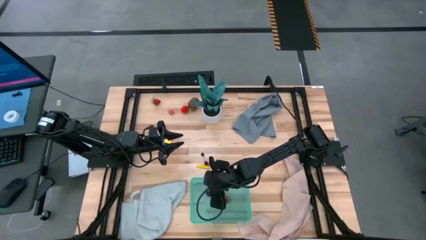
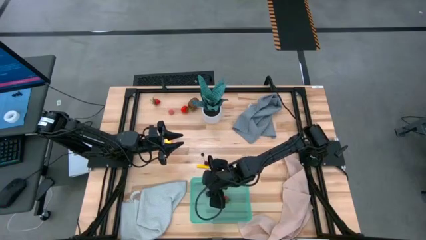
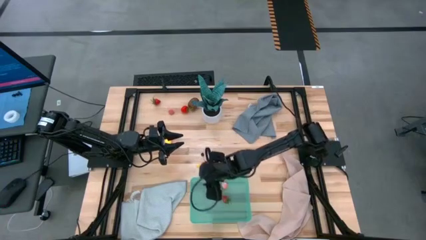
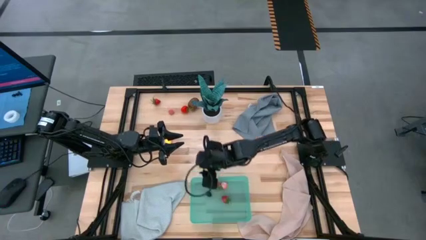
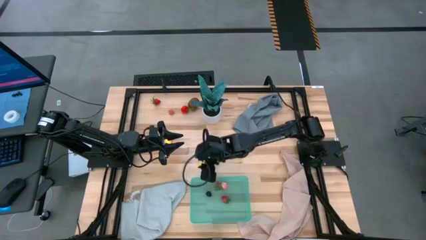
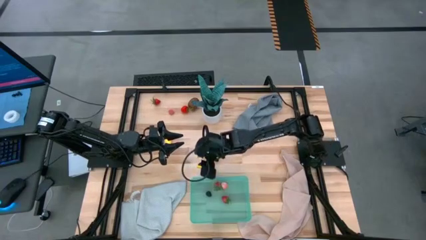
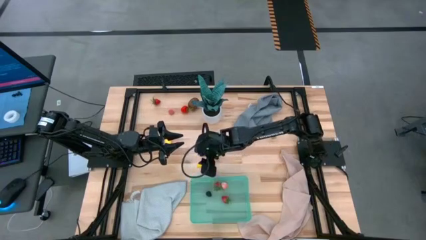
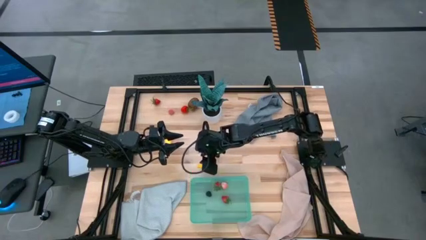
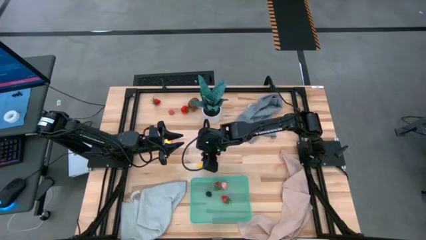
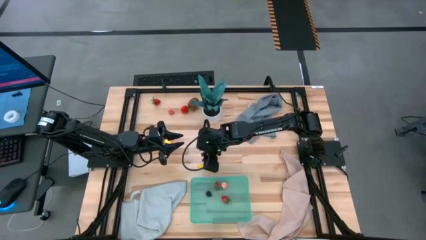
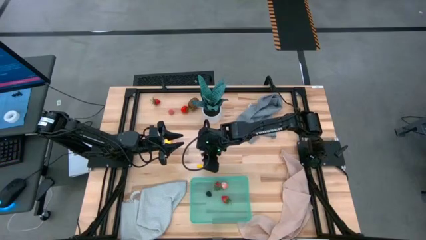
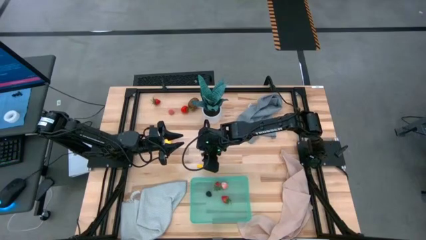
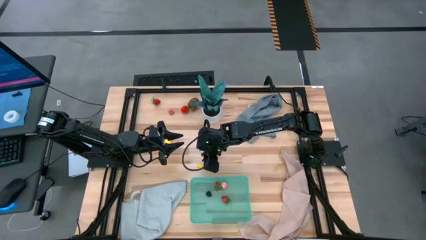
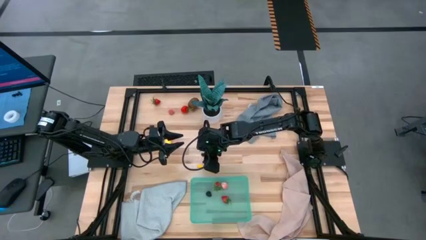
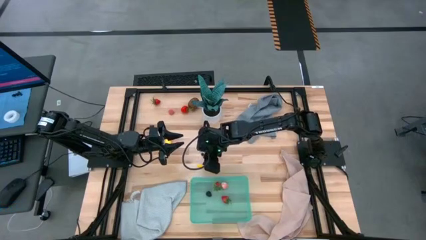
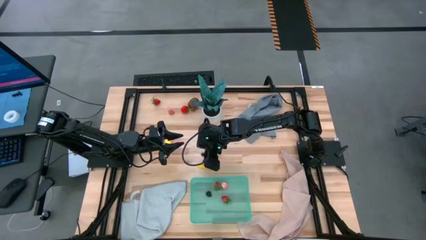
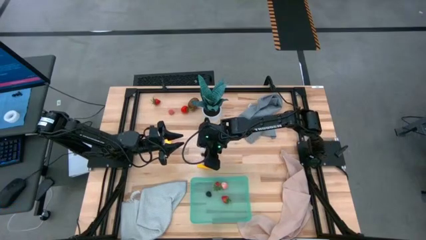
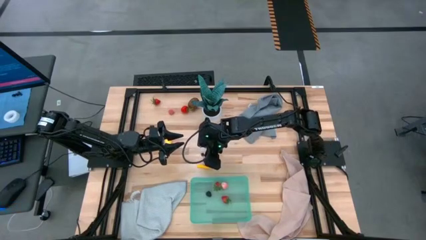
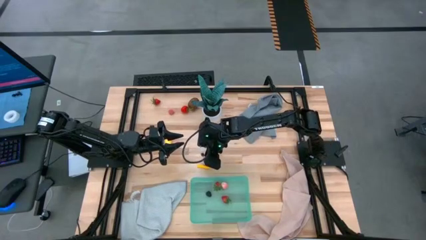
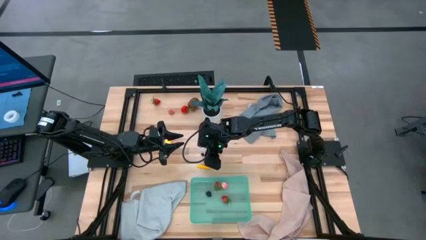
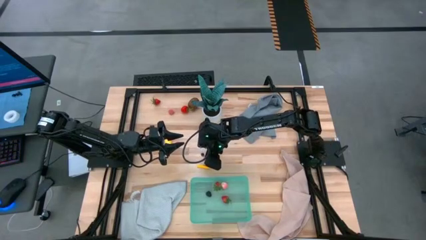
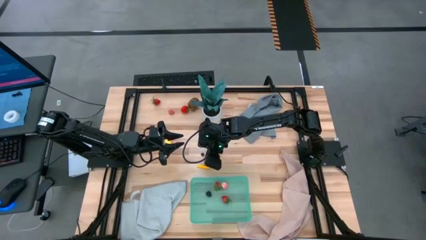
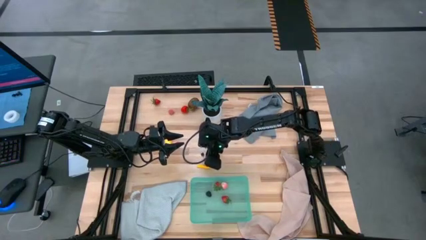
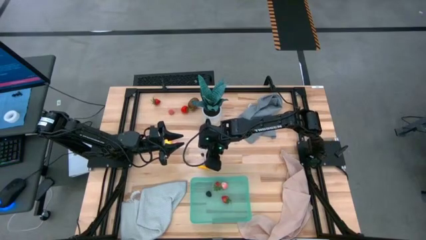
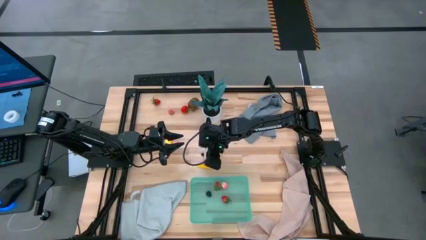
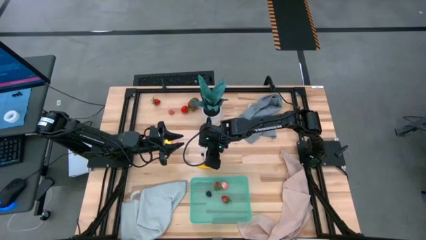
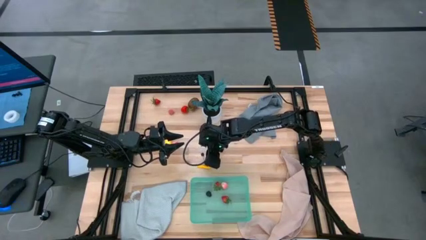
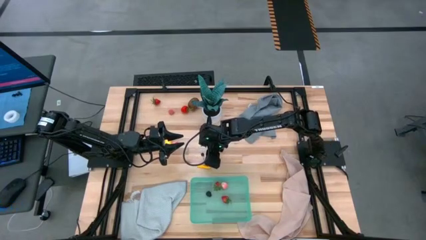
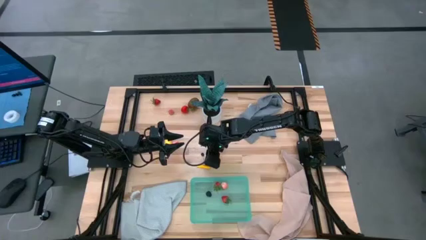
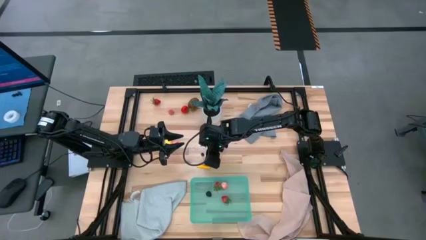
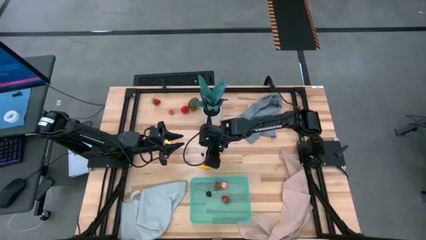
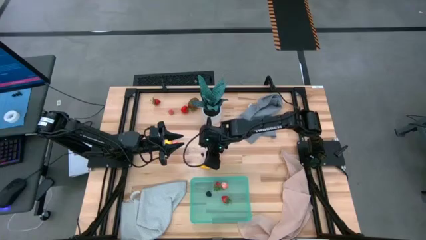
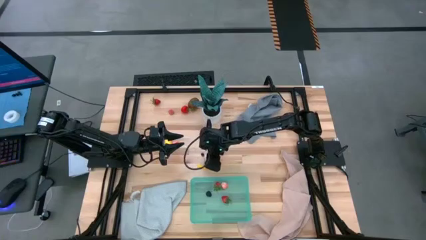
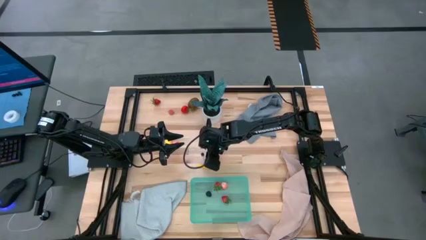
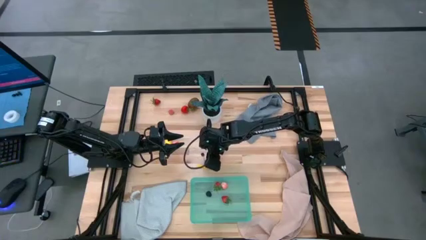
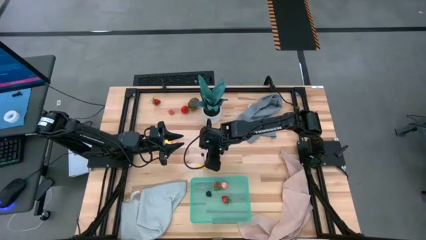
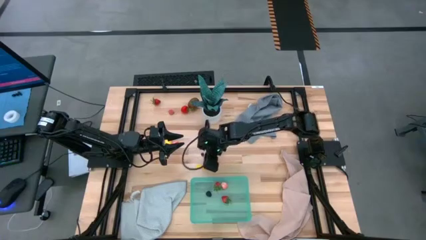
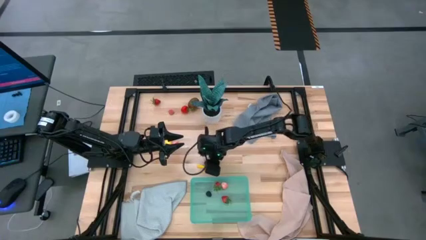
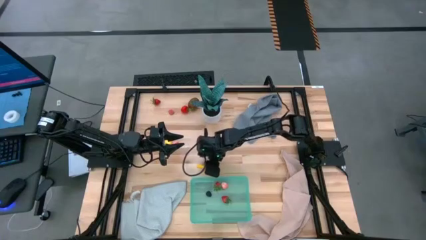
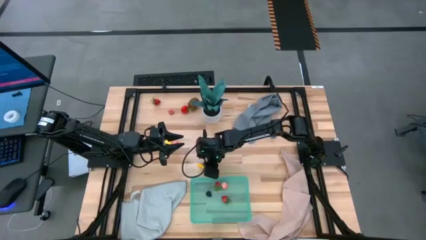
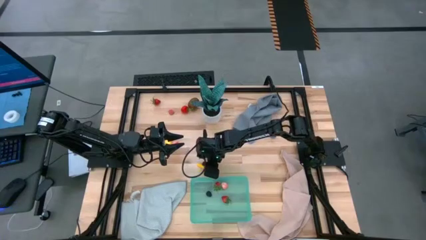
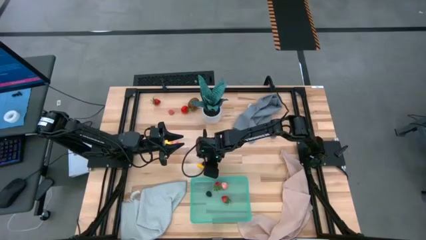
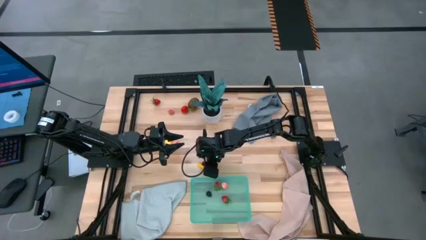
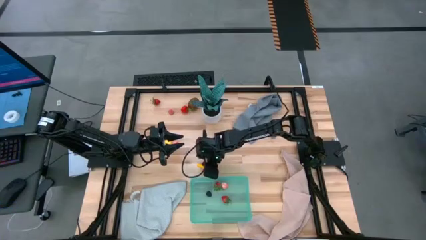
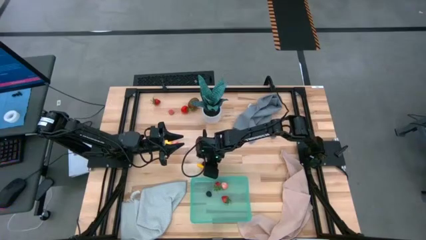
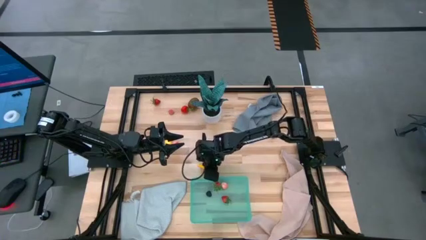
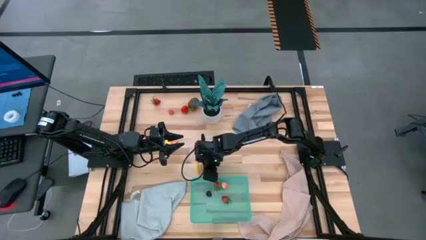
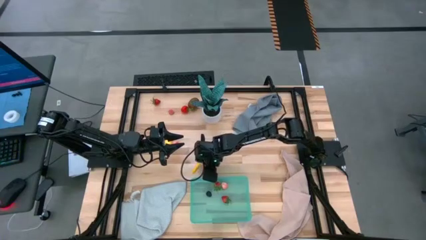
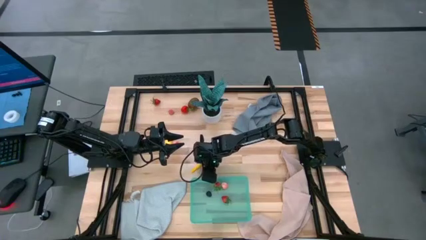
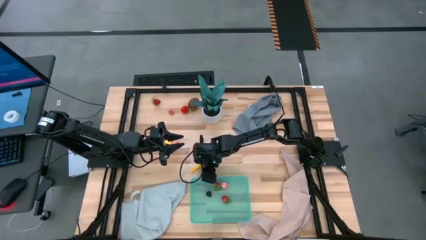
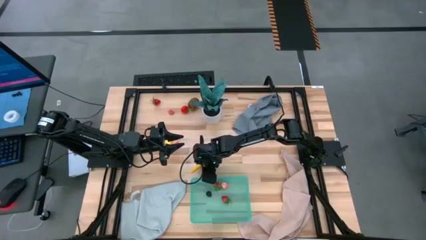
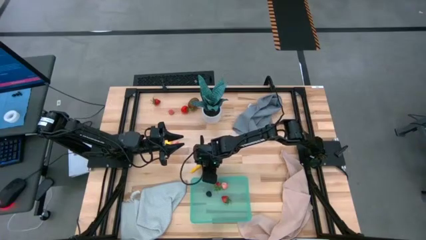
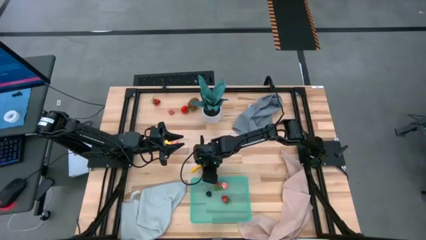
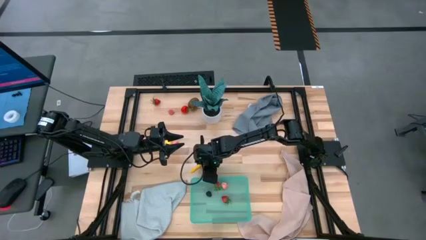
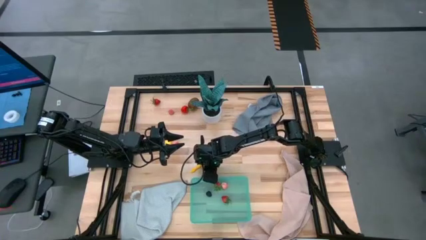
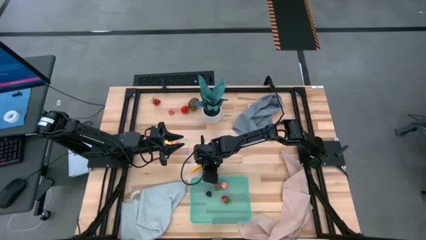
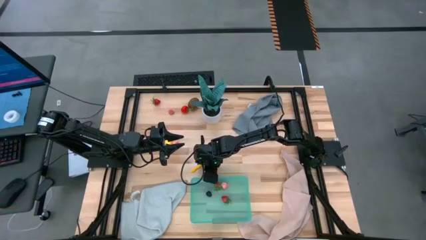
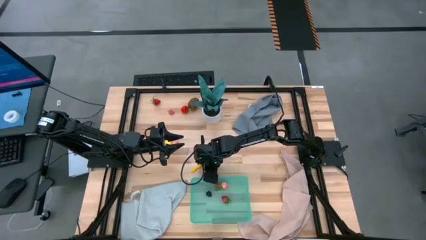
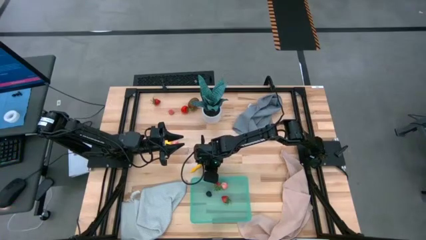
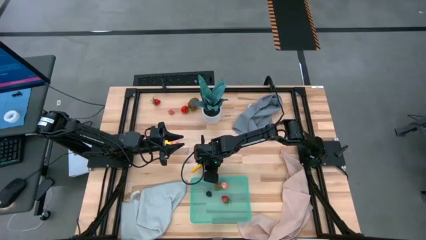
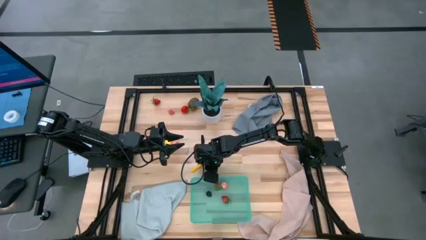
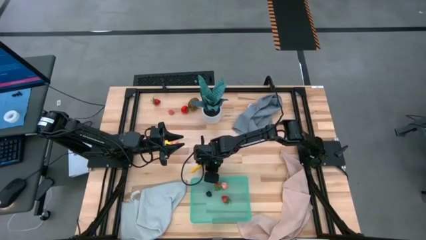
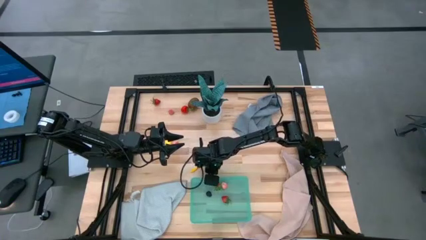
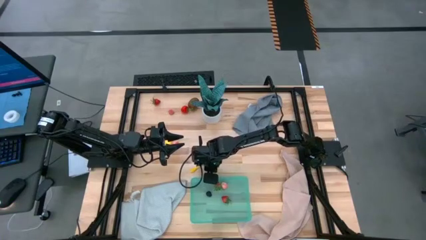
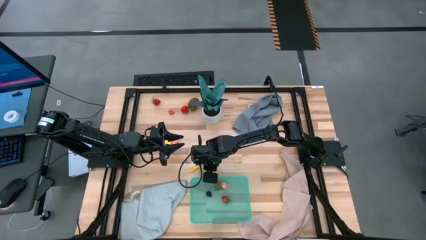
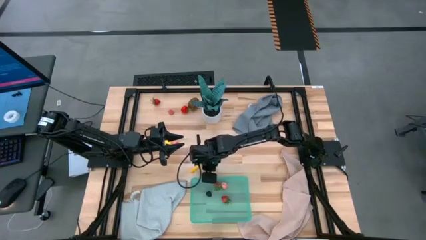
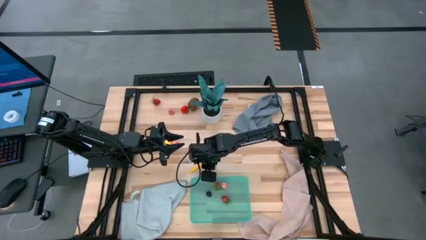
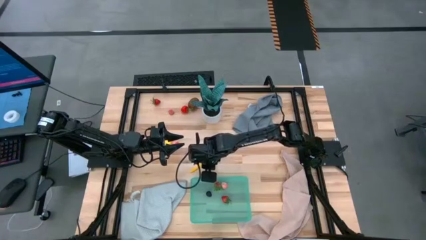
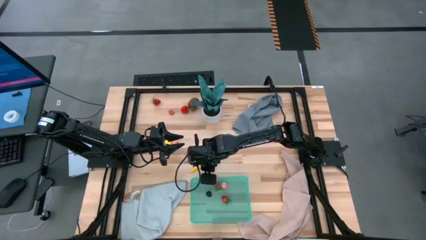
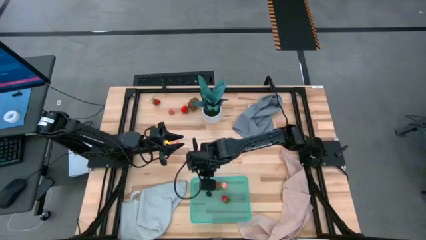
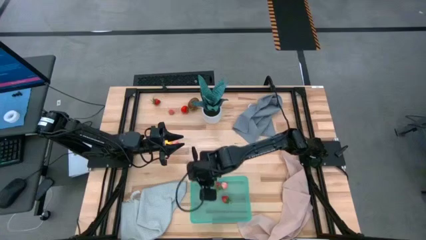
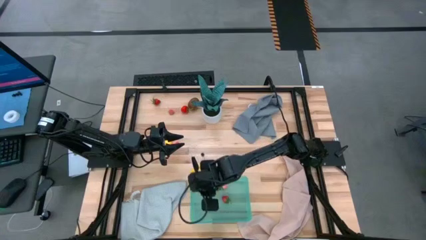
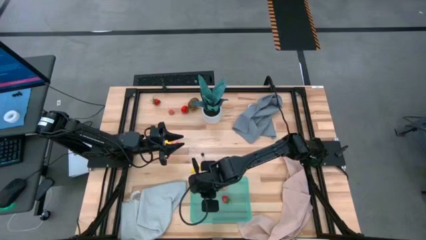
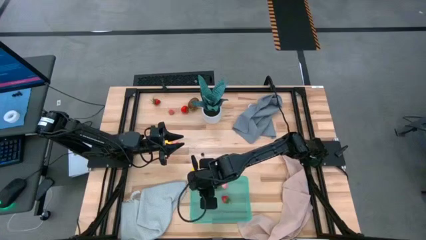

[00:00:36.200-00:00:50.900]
Task: Pick and placing Produce into tupperware
Put the red cherry into the green bin
